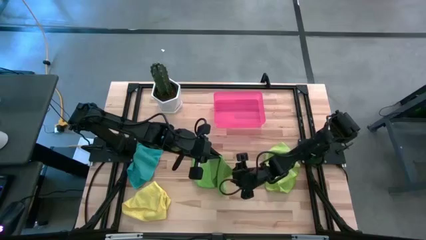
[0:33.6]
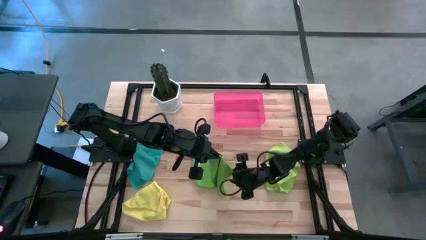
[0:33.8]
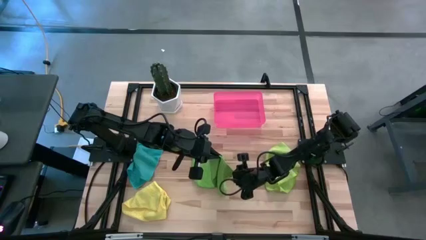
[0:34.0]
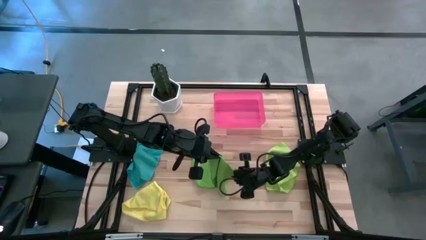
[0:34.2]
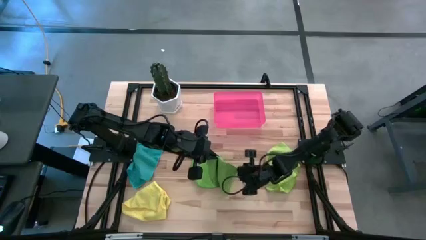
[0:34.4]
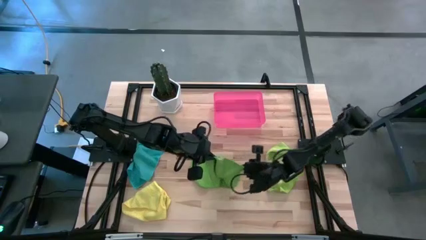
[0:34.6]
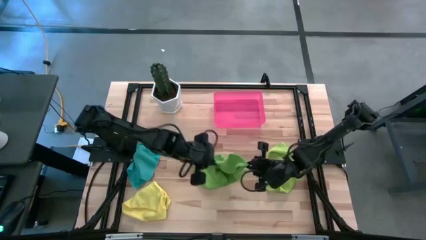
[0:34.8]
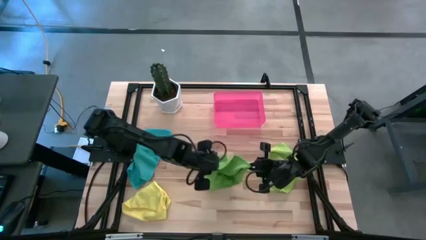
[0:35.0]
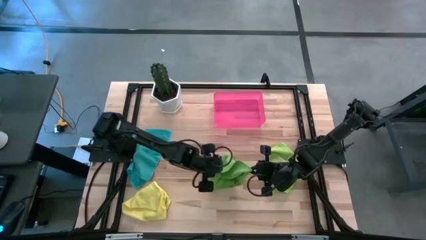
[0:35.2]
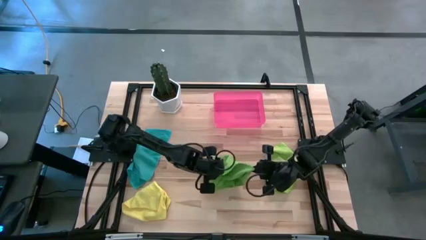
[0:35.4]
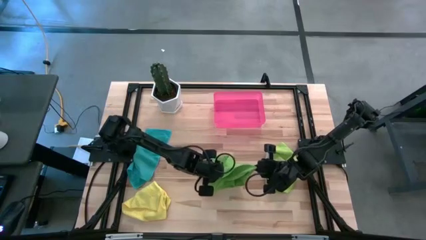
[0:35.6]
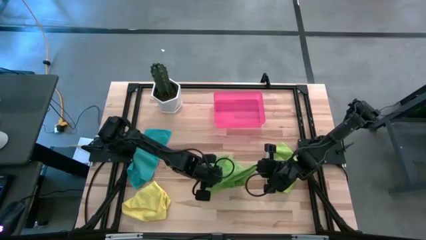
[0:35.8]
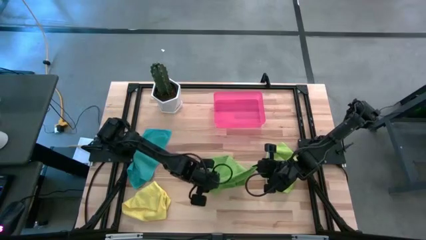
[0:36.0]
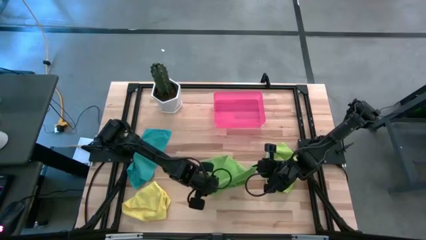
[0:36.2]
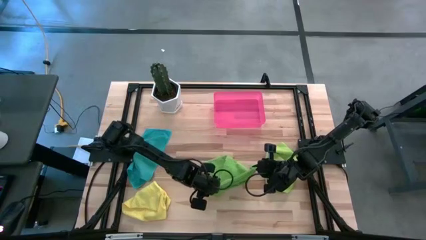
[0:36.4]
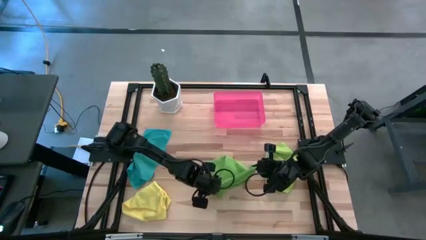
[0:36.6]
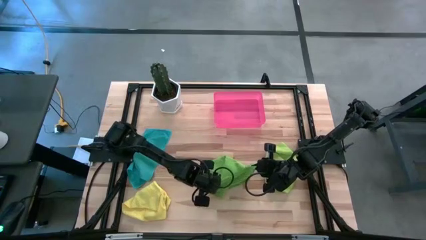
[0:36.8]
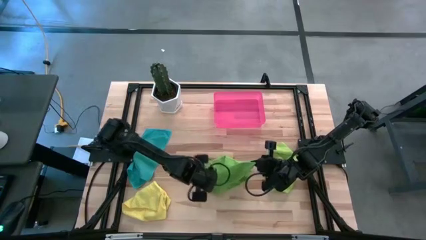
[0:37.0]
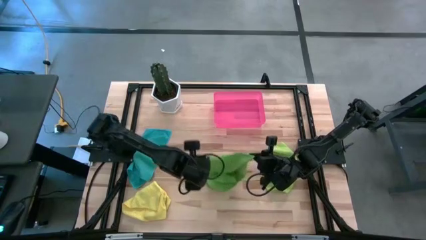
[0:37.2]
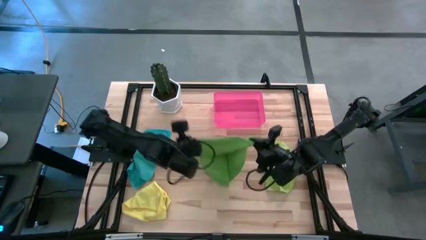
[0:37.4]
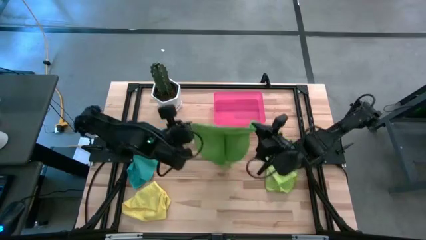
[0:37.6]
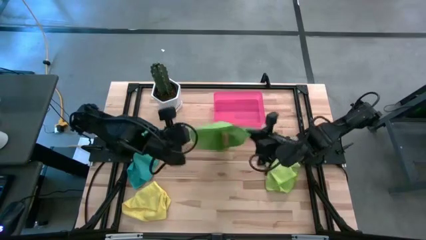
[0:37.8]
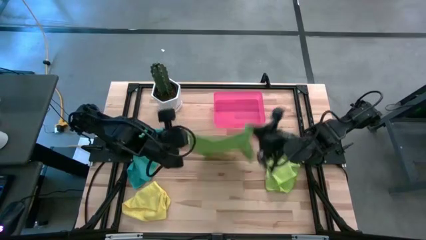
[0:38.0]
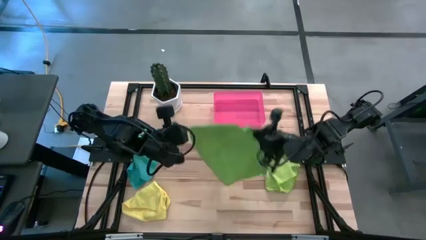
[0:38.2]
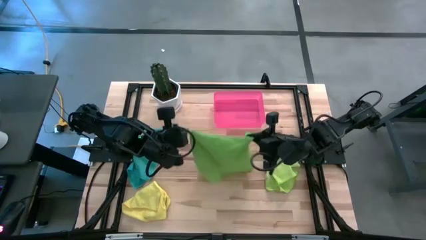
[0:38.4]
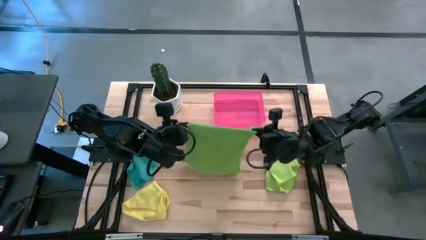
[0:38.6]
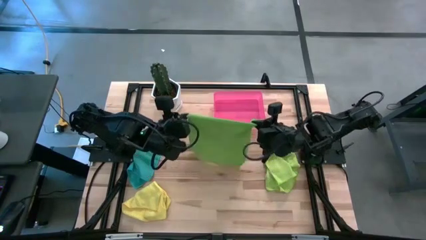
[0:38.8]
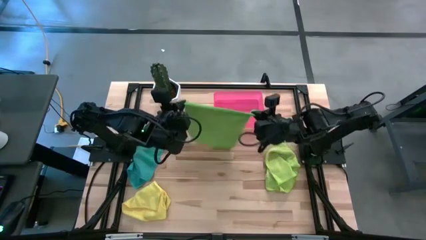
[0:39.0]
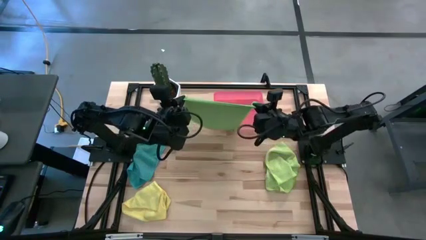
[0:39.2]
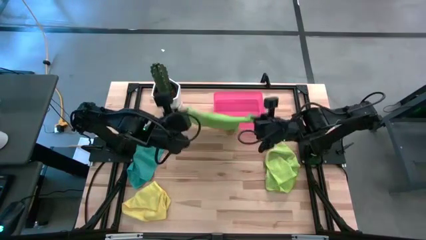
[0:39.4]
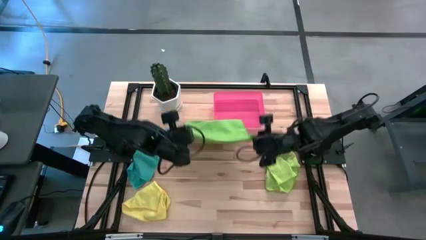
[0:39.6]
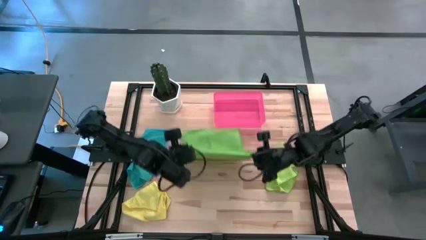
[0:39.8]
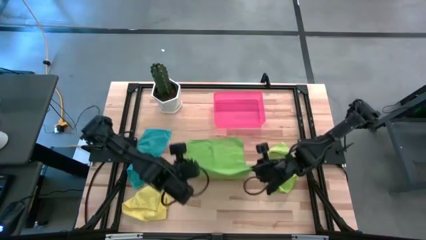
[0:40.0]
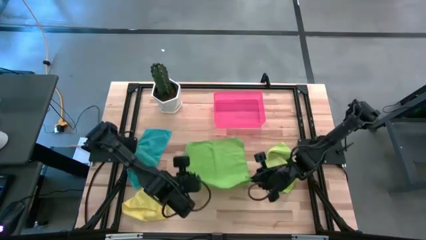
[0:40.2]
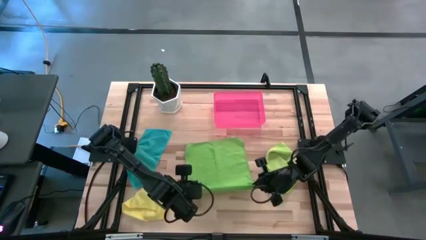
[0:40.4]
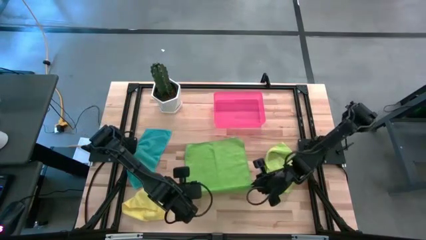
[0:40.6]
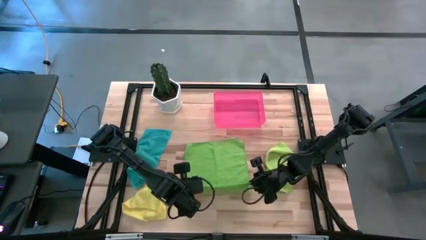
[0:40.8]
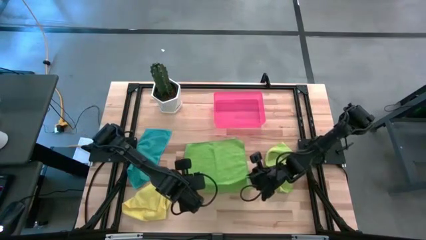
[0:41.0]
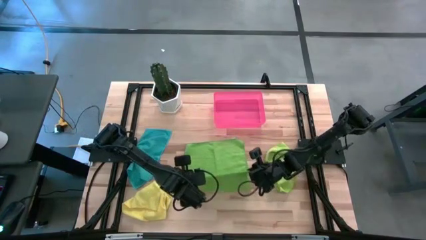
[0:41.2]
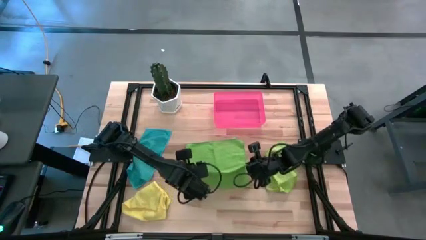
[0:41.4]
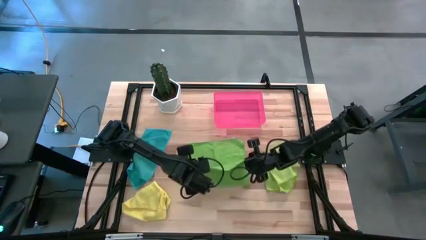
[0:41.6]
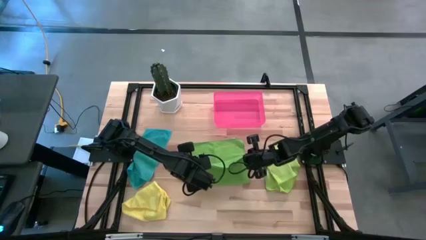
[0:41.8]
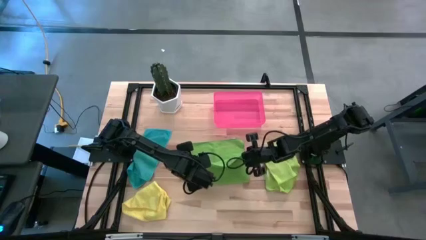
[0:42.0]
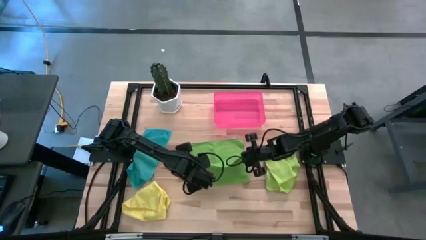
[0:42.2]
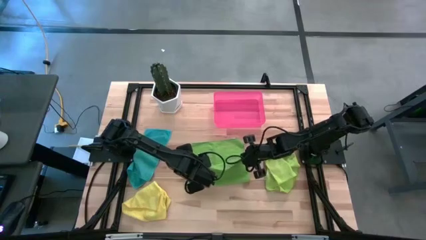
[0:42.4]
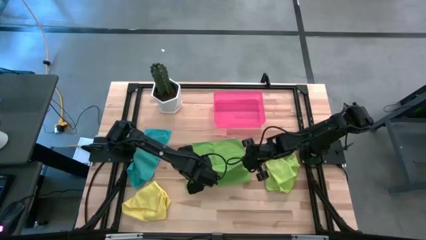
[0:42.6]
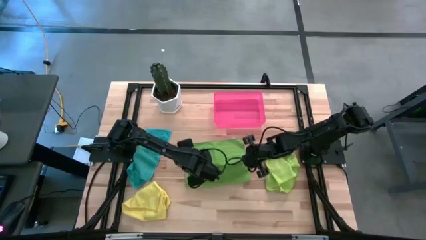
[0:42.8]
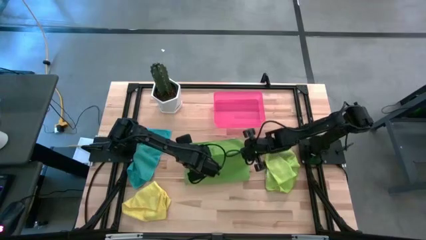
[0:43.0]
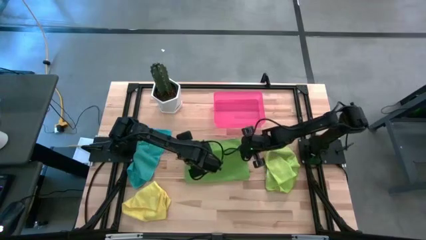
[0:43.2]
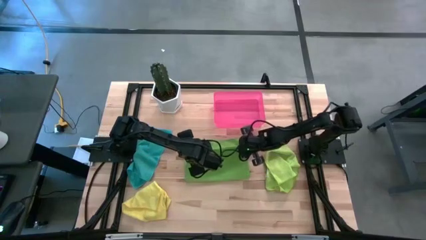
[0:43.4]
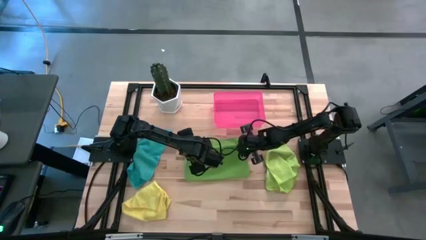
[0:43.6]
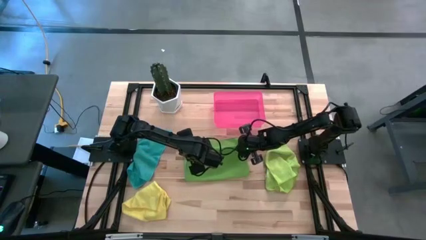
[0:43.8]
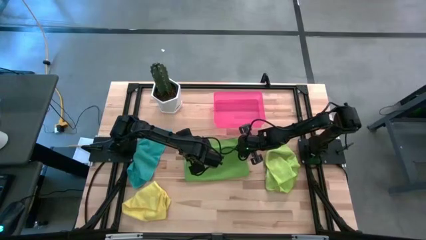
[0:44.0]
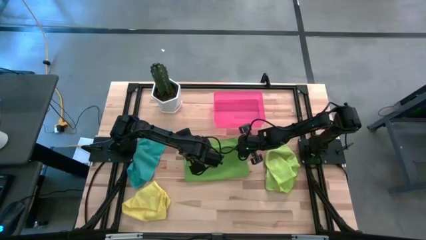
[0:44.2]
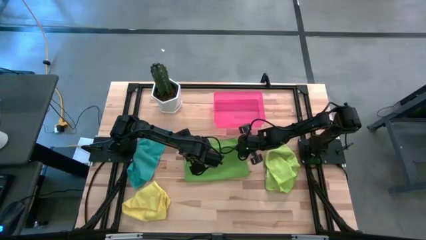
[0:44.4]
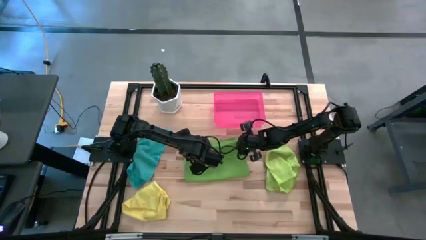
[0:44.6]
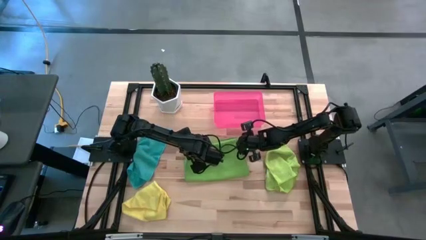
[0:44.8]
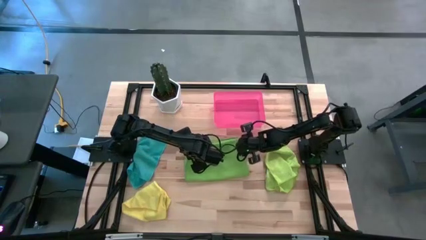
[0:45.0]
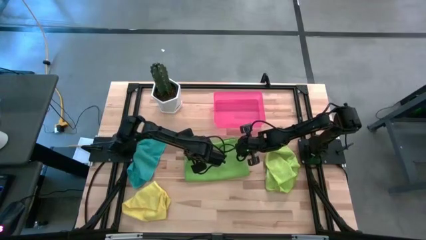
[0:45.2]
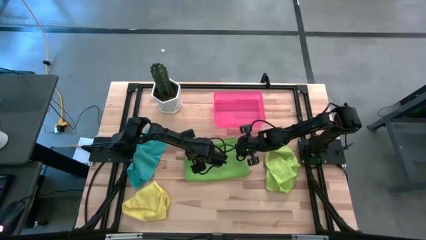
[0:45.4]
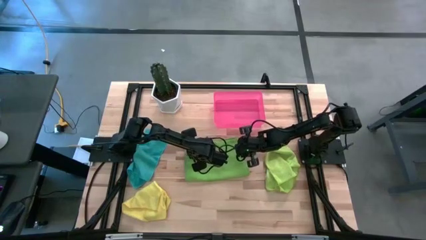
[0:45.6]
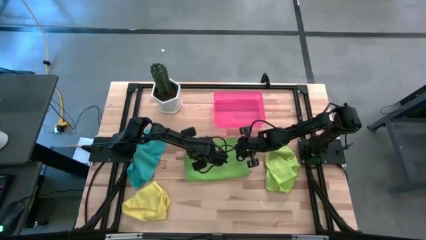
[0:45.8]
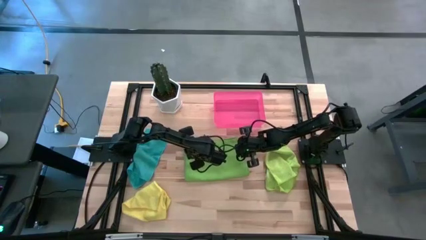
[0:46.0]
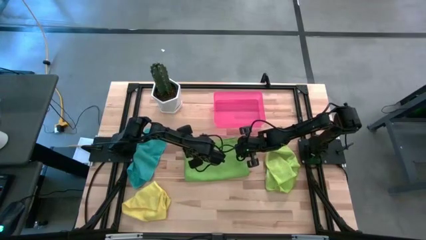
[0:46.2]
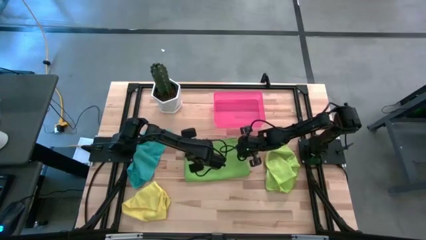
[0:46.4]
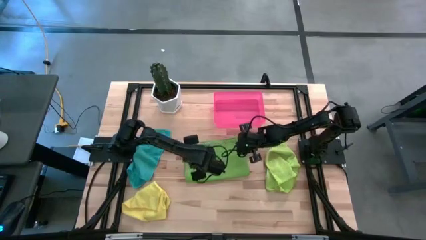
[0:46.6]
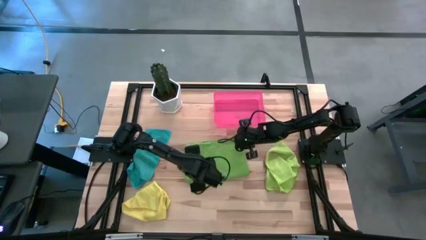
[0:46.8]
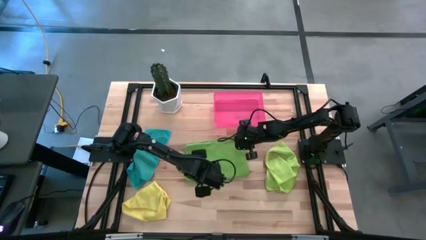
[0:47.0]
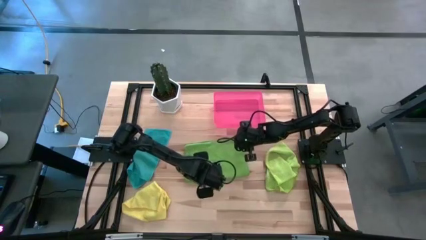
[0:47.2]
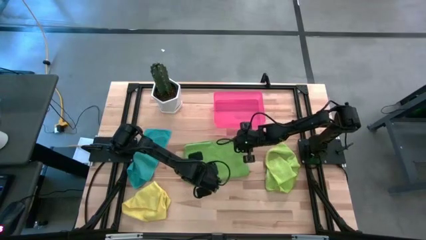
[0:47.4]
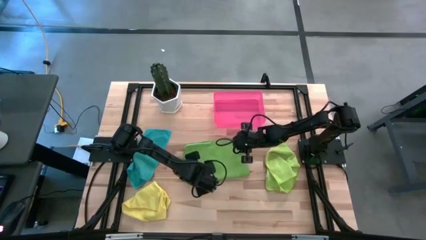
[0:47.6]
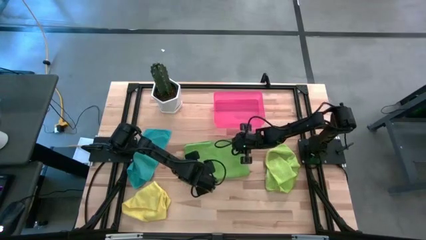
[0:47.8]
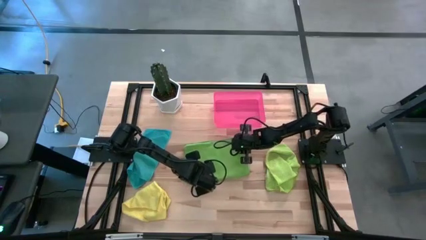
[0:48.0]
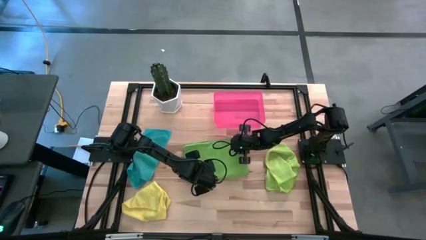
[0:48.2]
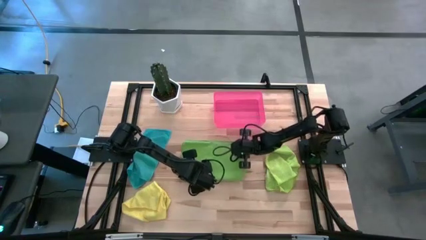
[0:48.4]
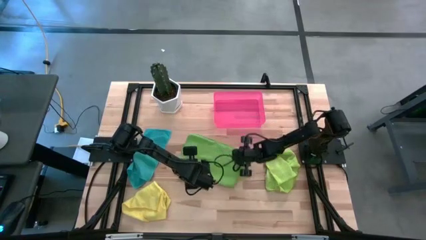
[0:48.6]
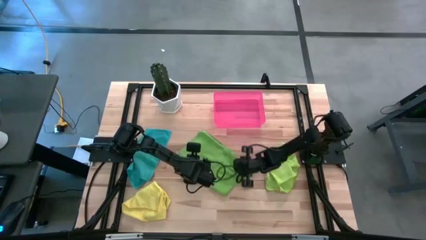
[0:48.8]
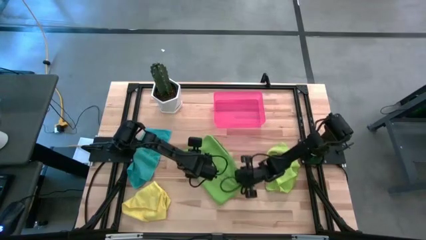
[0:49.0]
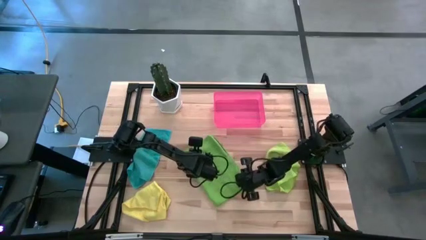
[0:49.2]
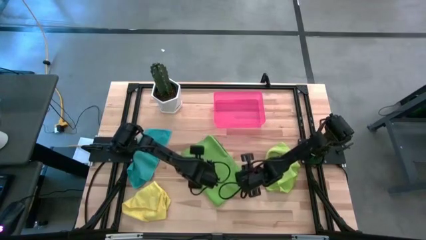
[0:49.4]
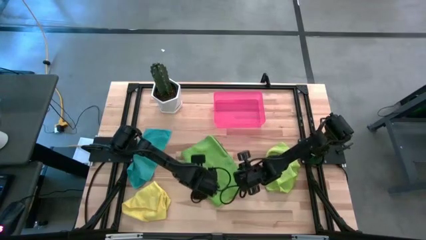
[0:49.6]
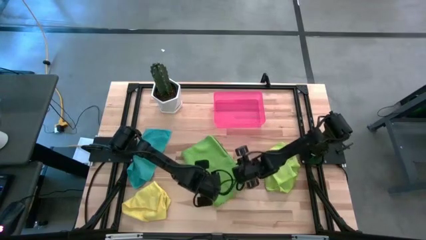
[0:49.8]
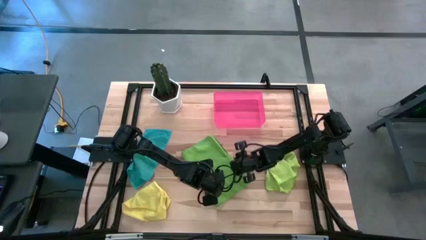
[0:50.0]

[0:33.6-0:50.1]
Task: Roll microfiber towels into tight, uniform cylinder then place into a basket
Roll the green microfiber cloth
